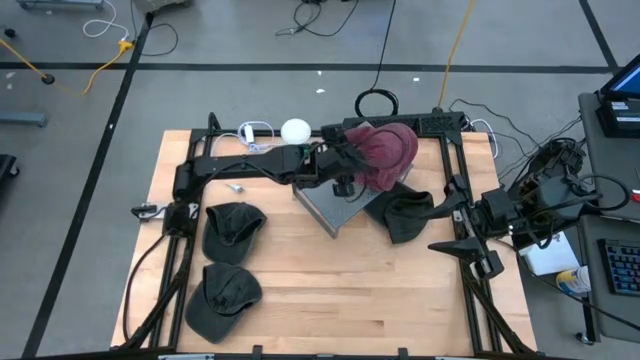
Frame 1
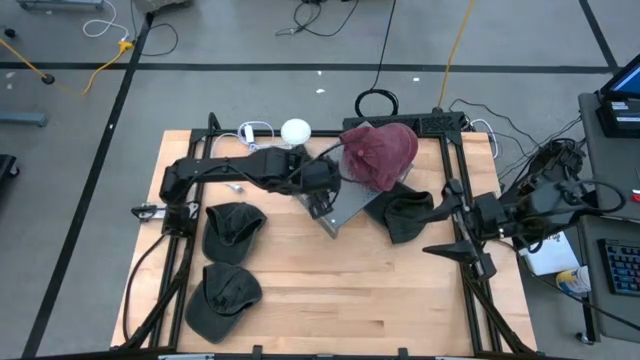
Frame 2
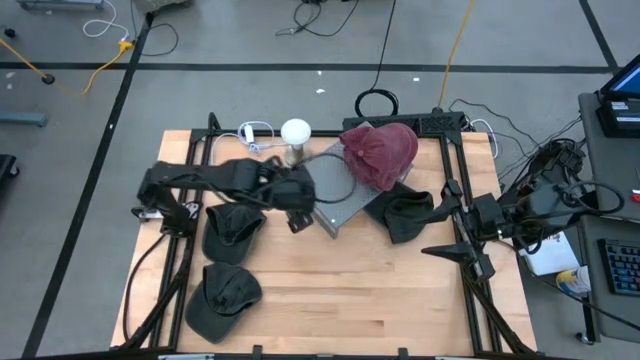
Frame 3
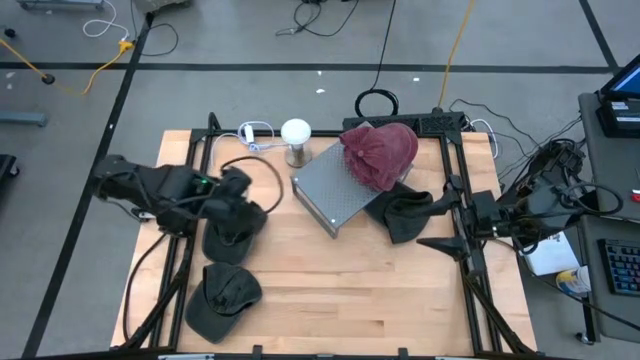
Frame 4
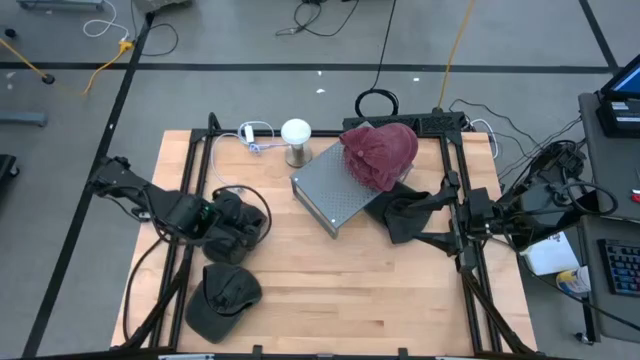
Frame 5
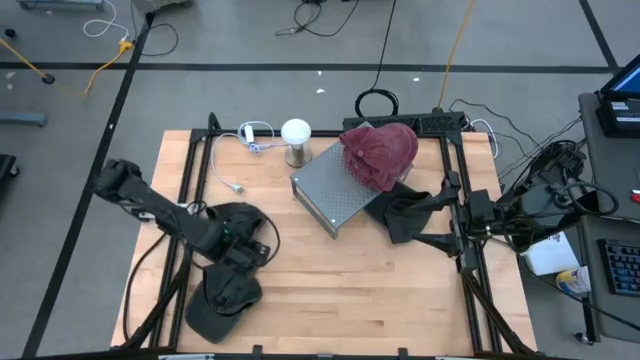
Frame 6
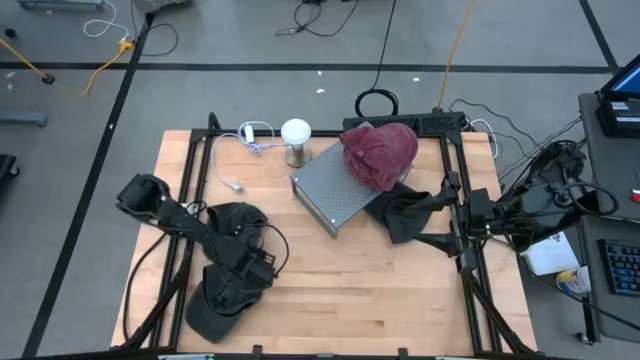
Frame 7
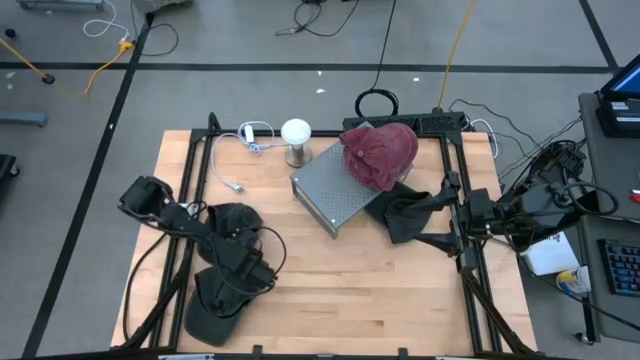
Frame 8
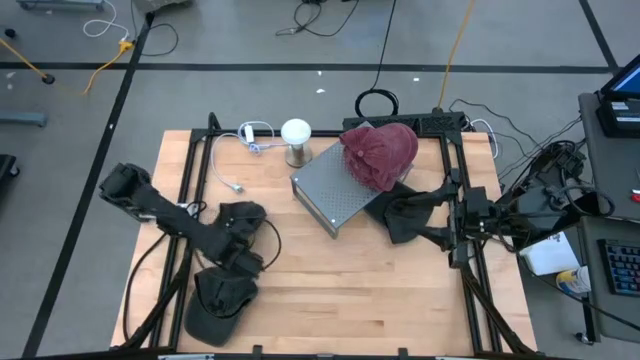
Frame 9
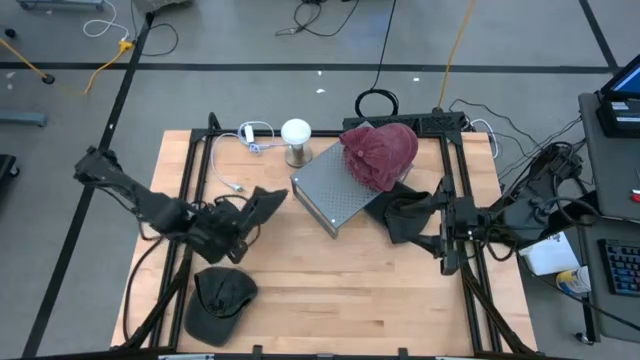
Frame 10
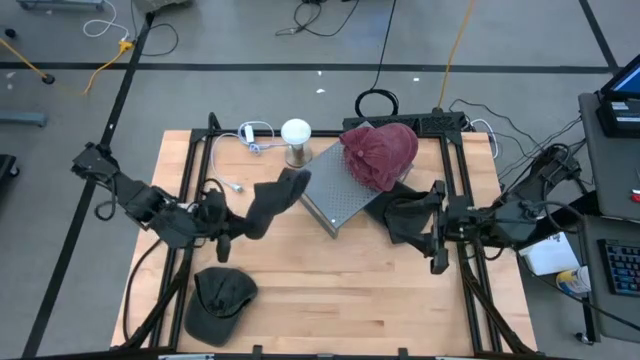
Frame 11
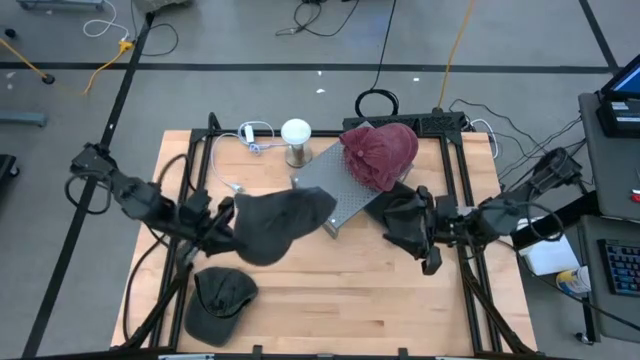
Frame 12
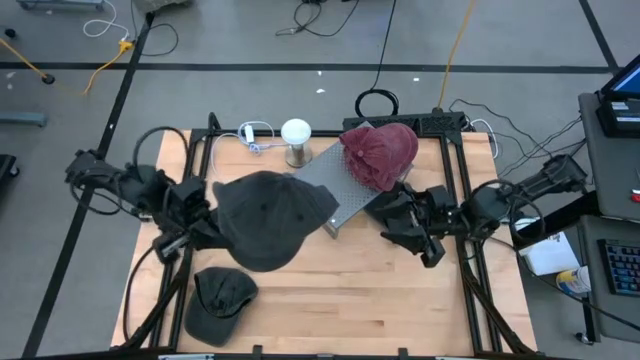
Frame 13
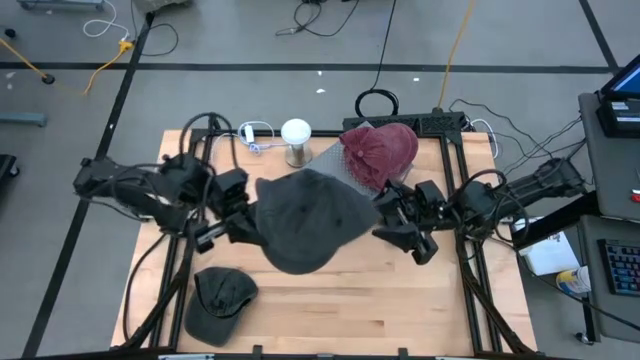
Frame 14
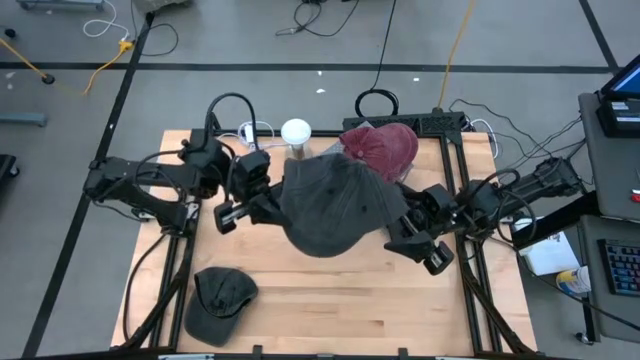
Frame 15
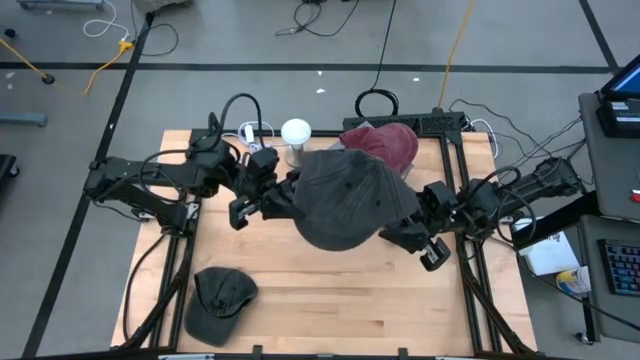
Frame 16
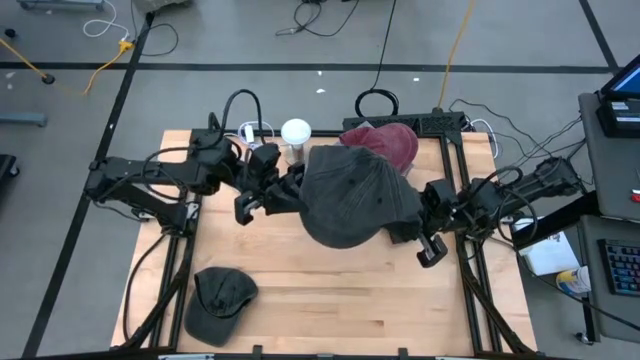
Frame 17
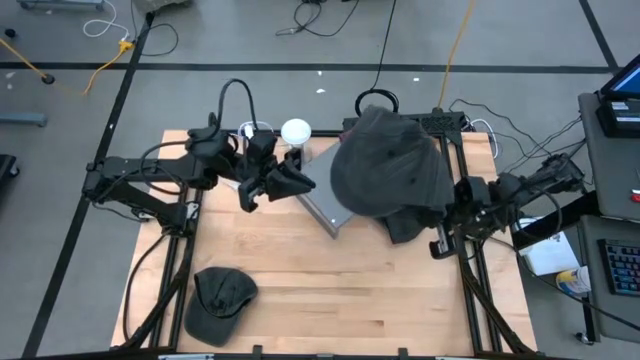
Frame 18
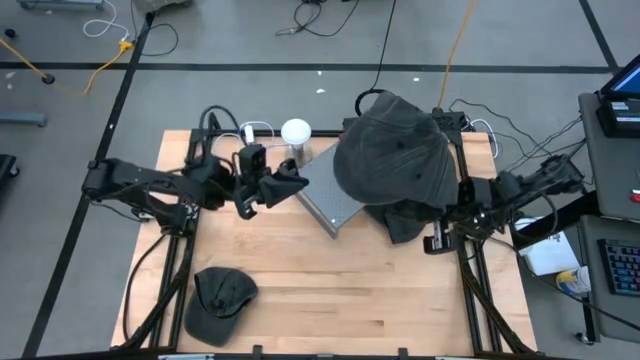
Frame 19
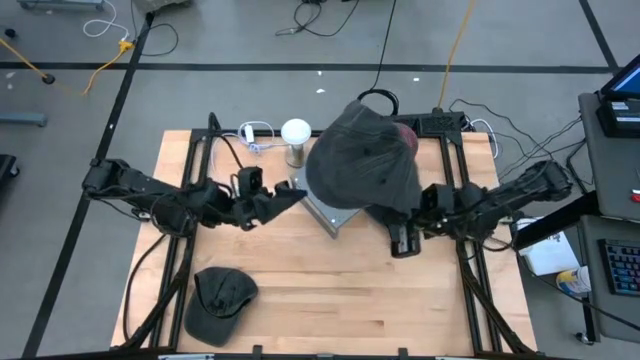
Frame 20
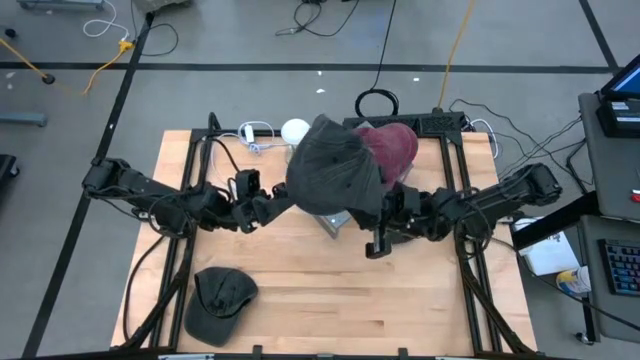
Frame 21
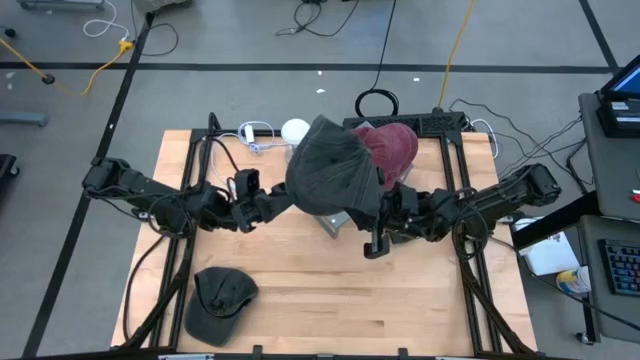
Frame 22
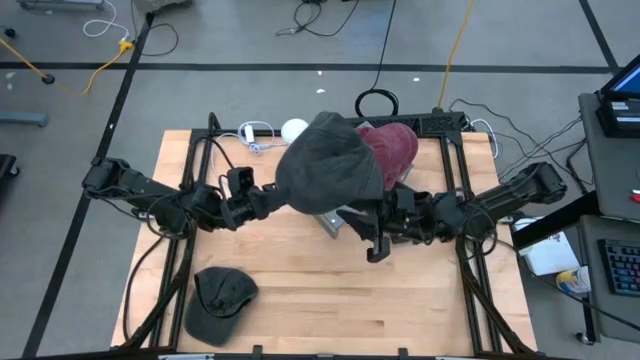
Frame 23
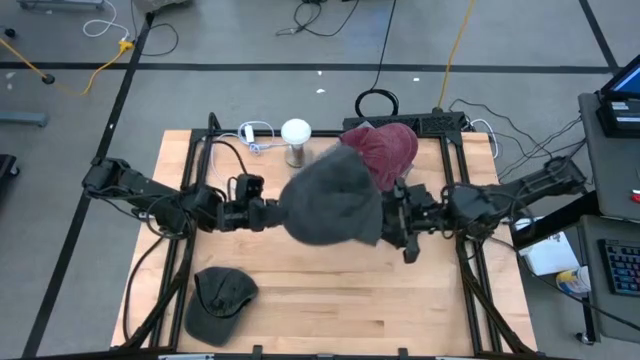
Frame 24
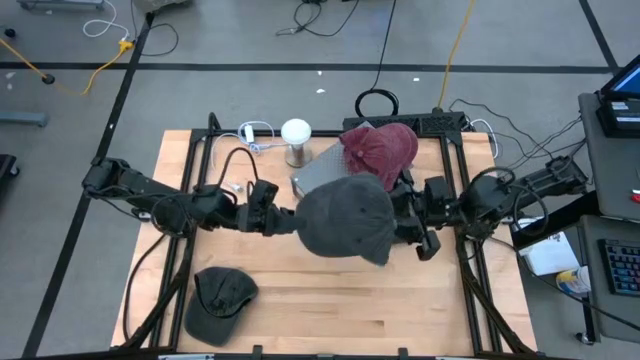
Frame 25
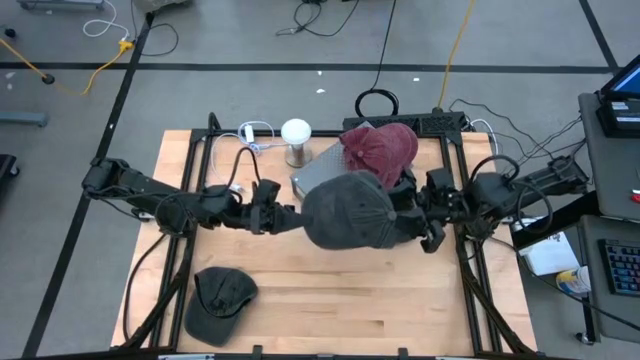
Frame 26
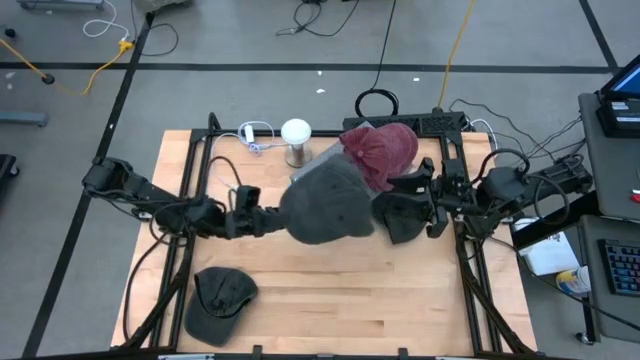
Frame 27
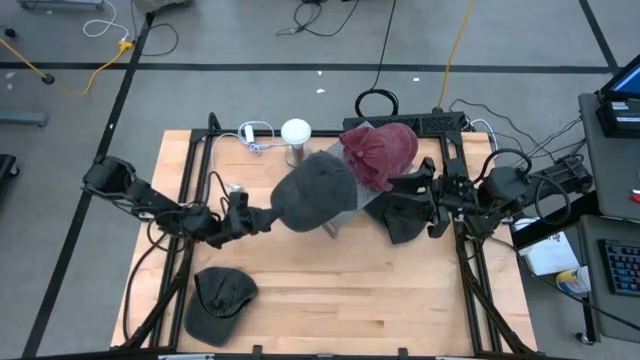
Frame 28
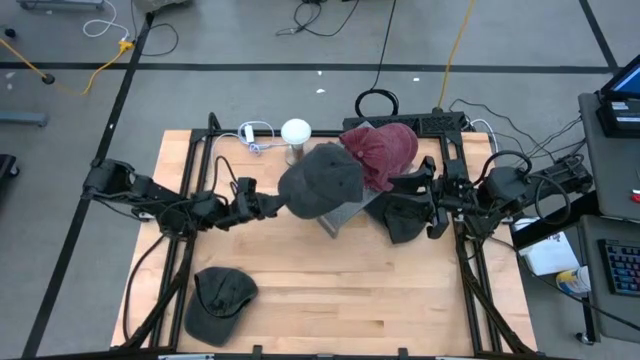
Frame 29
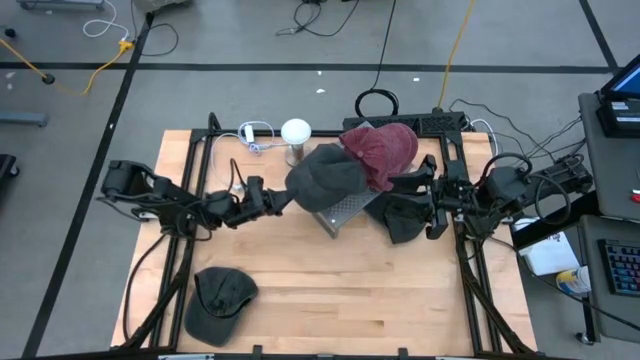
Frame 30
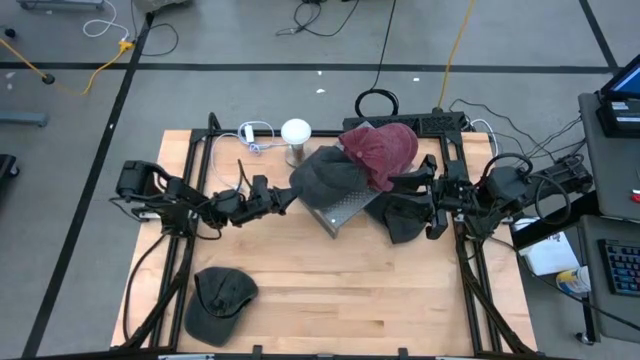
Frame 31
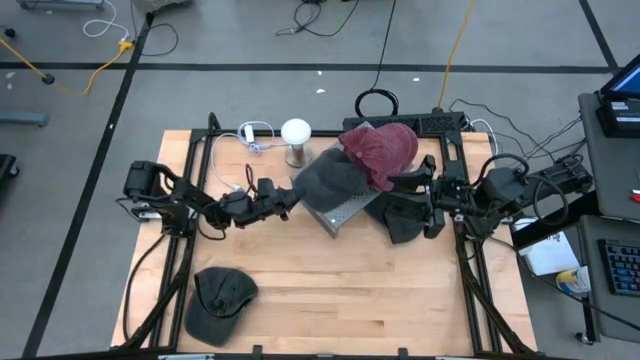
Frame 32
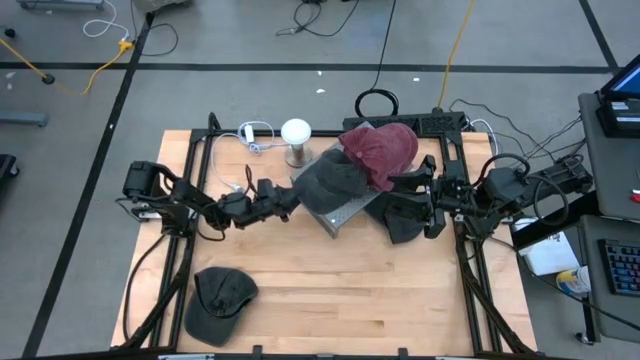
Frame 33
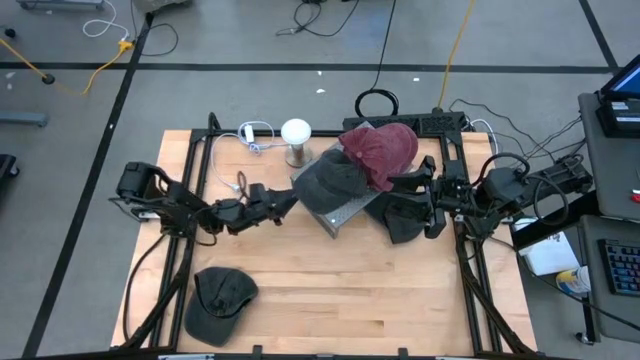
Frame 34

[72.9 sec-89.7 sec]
Task: Pick & Place hat
Put the top left black cap on the shelf
